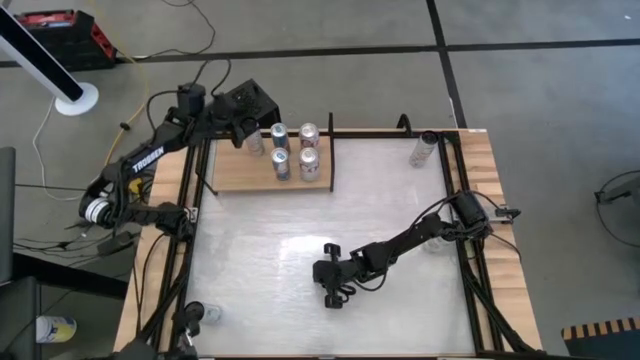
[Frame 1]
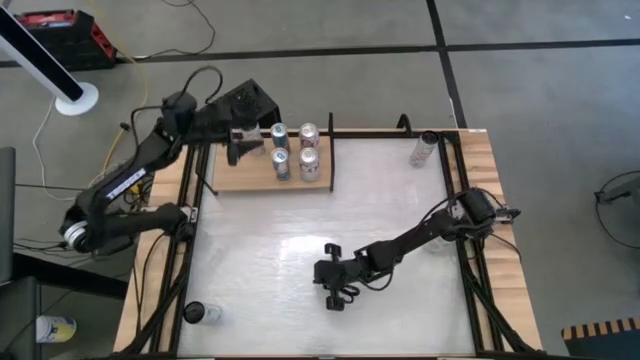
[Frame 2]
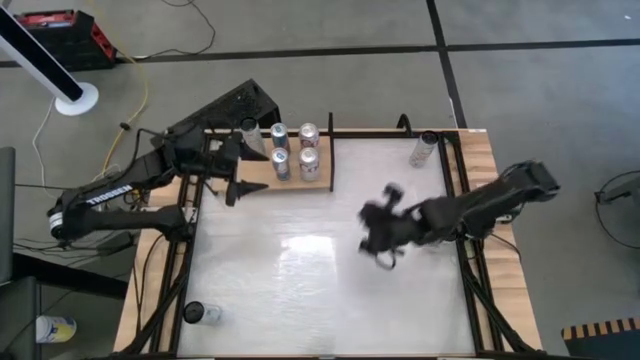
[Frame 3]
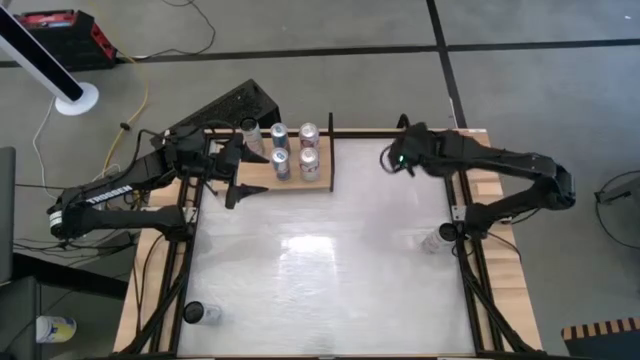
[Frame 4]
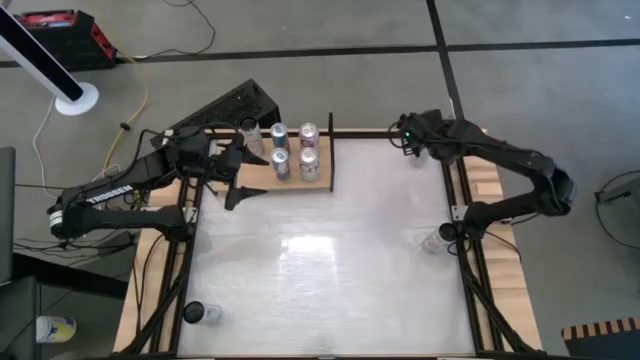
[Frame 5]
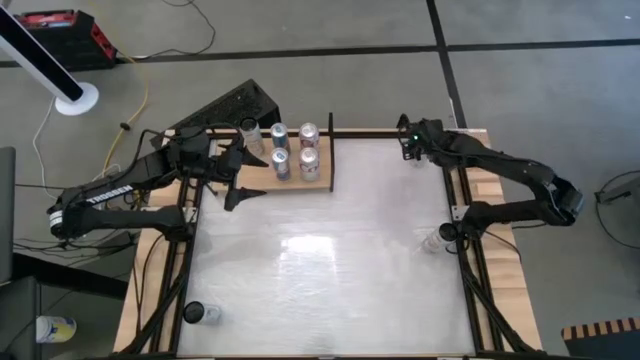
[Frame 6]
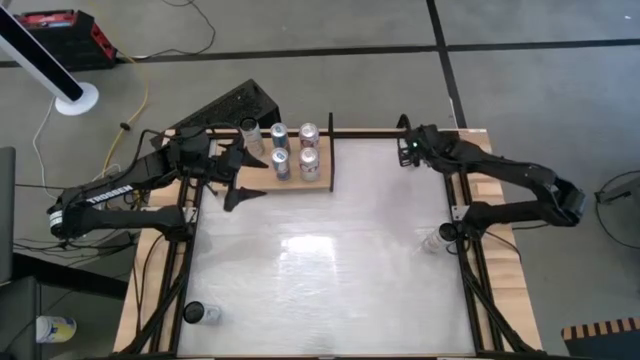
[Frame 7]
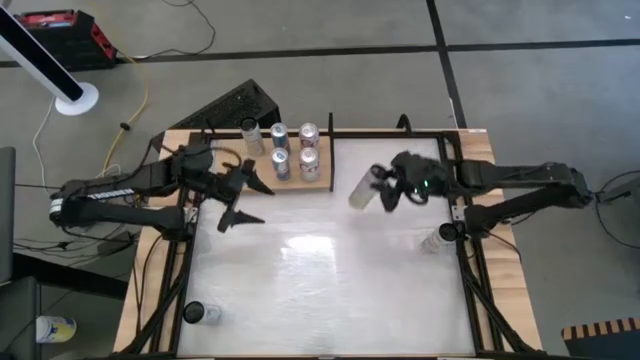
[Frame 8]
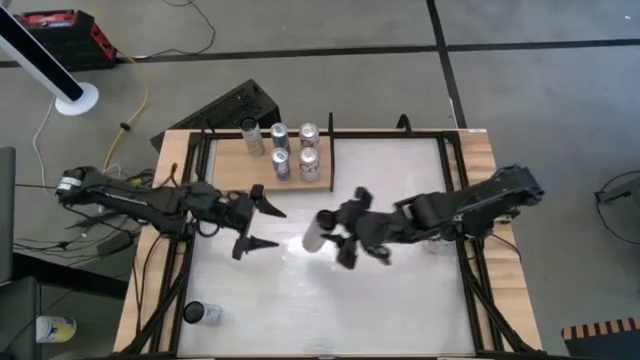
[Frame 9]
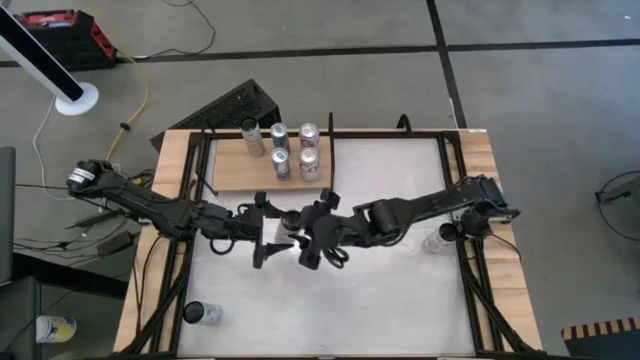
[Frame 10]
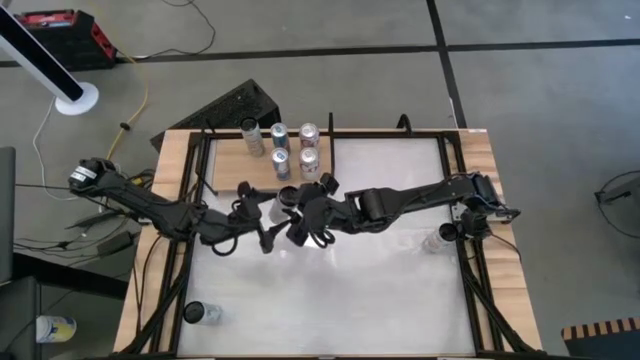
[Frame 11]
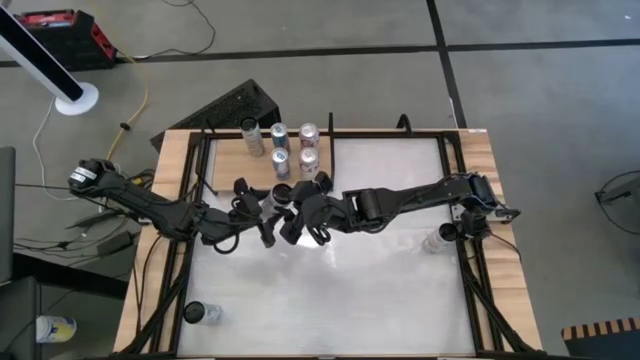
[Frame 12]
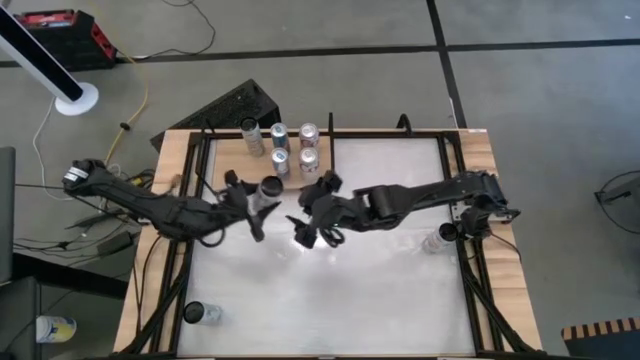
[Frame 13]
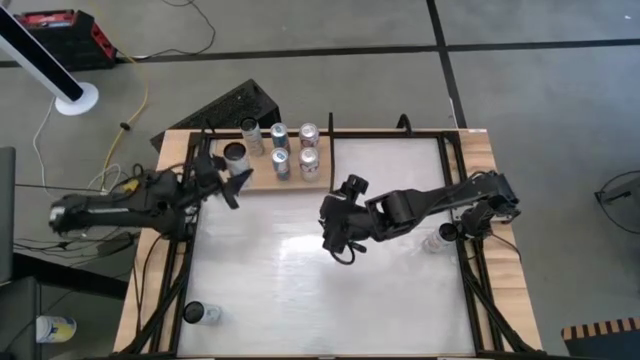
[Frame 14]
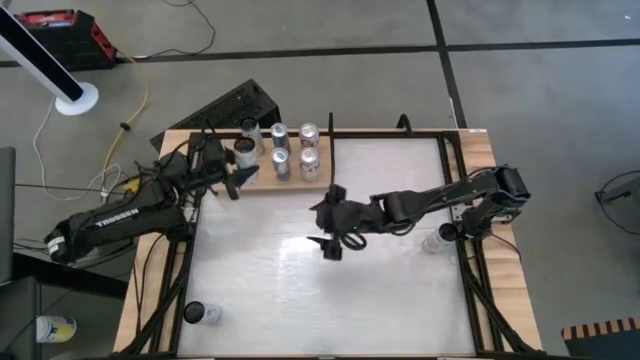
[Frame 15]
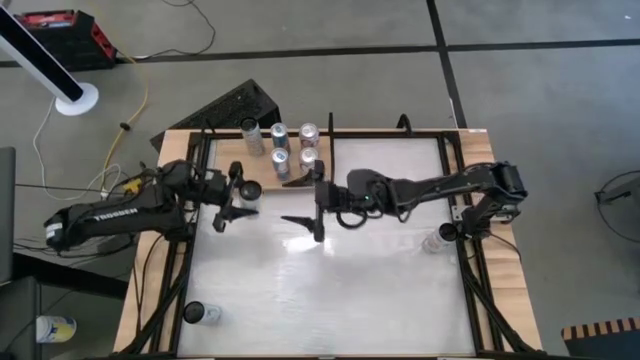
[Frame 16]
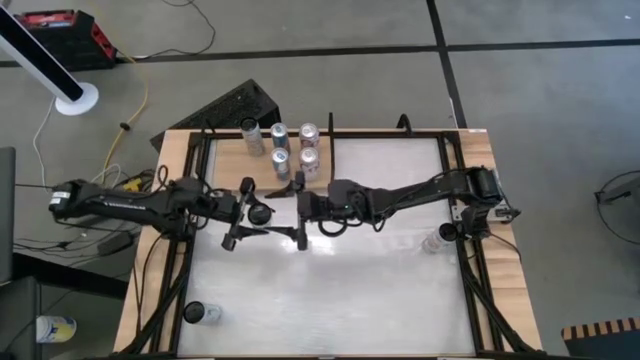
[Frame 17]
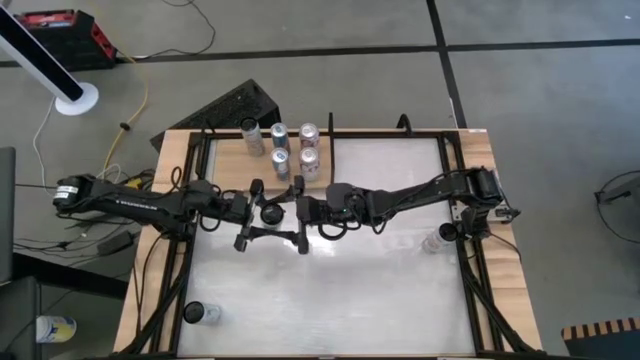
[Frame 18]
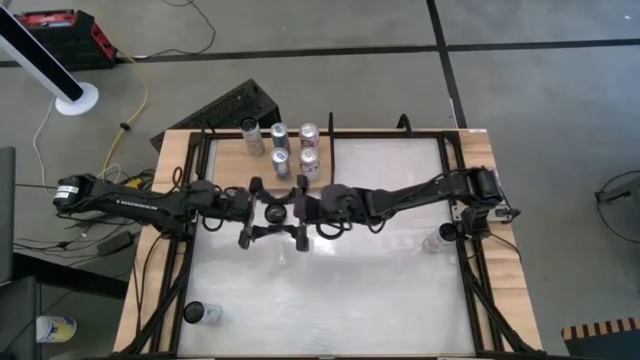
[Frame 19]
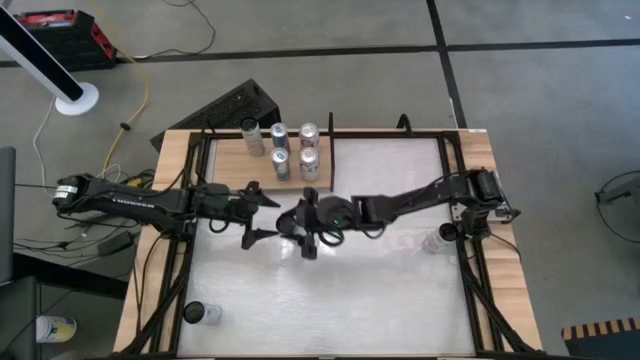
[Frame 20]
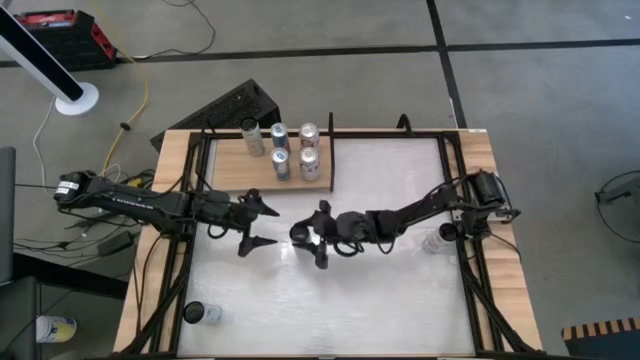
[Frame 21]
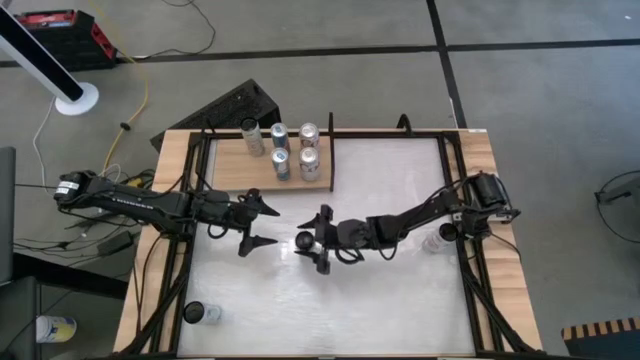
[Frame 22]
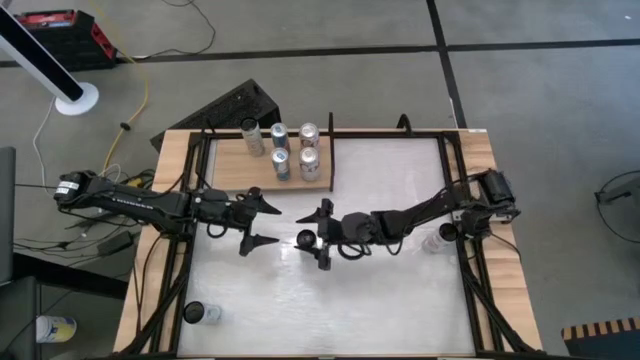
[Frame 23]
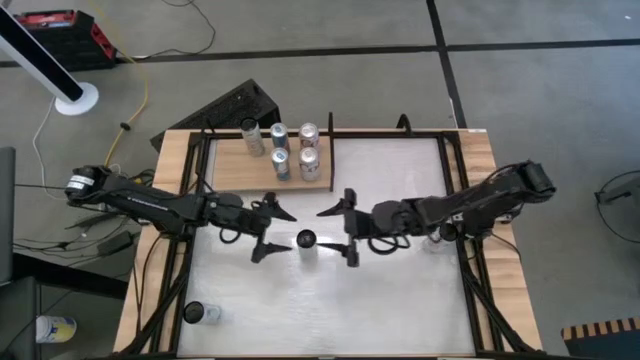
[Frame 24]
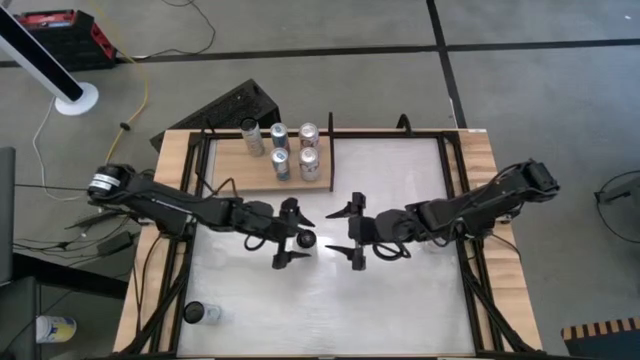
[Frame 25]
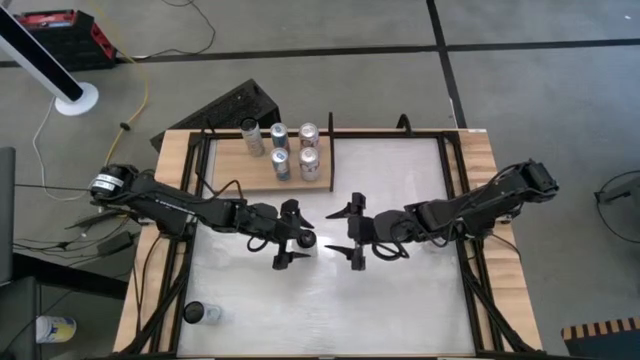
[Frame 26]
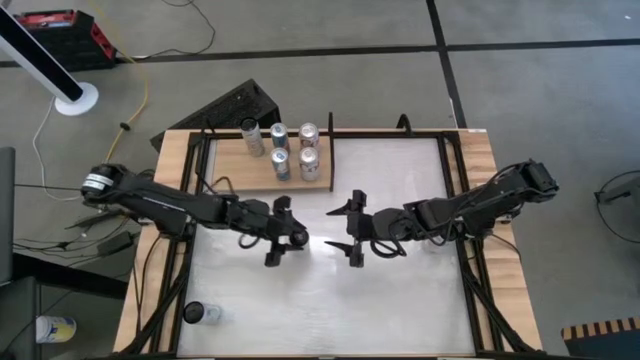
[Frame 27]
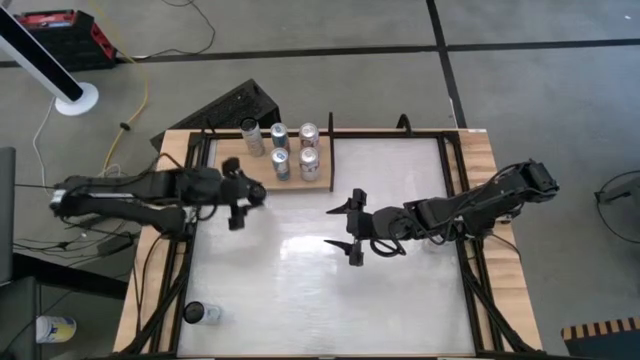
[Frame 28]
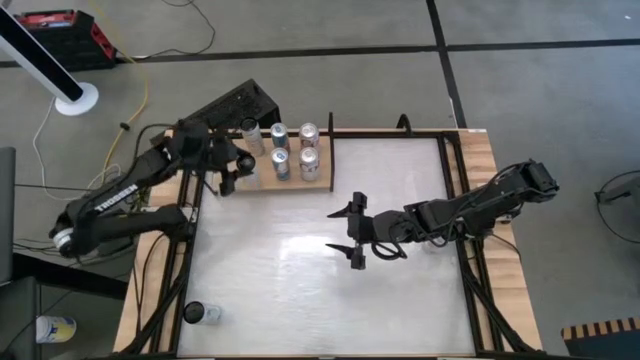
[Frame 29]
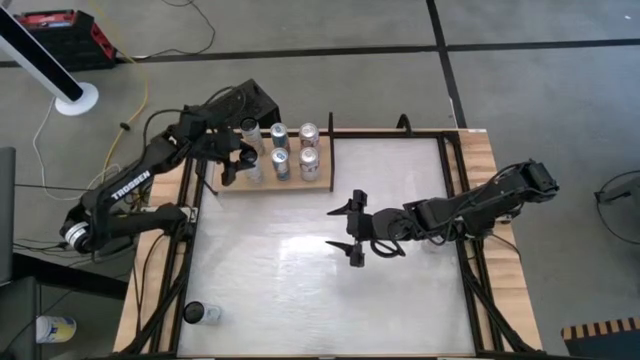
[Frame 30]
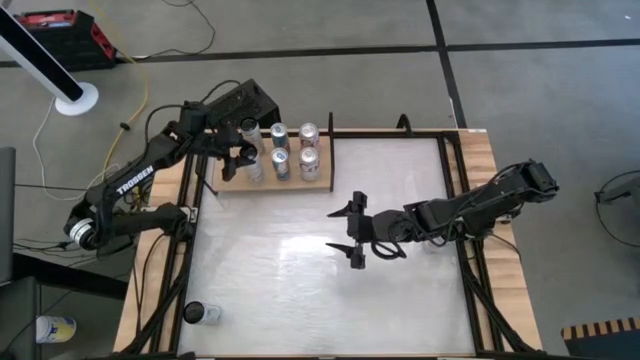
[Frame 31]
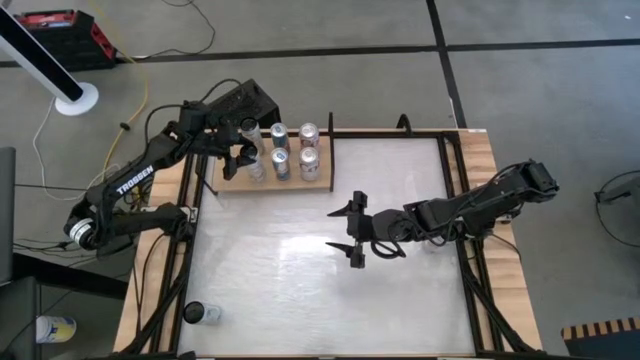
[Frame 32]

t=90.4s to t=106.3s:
Task: Place canned beverage on shelf
Put the orange soda can on the shelf

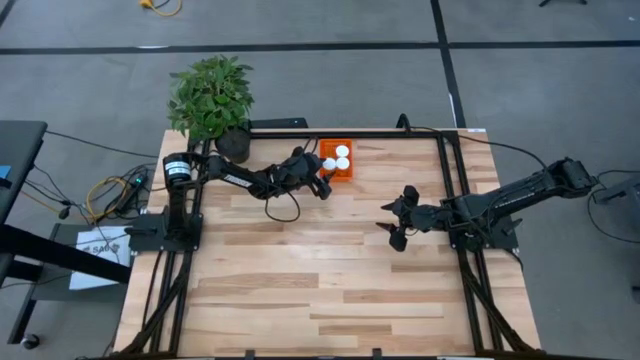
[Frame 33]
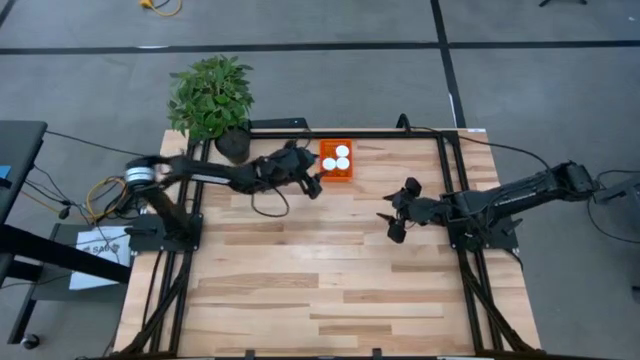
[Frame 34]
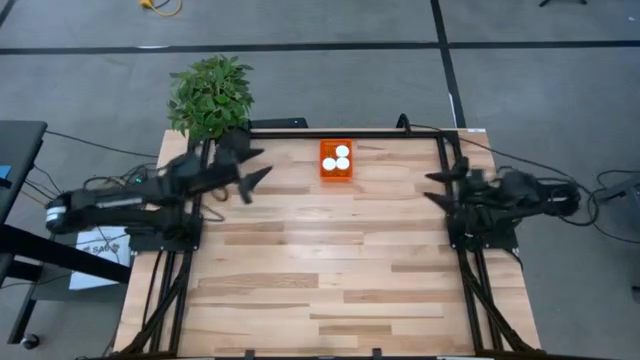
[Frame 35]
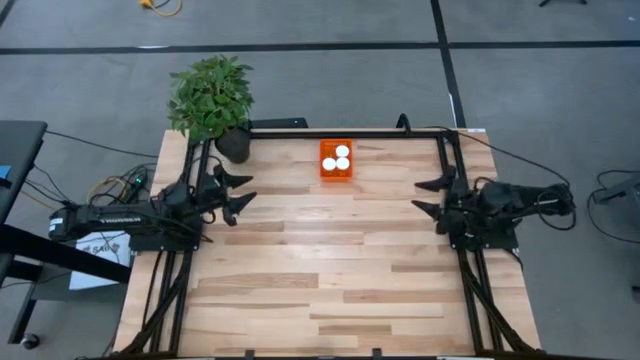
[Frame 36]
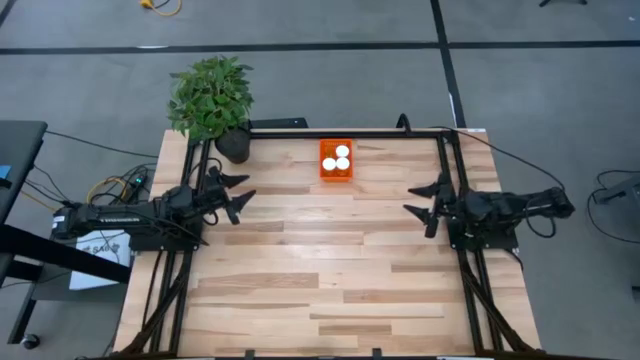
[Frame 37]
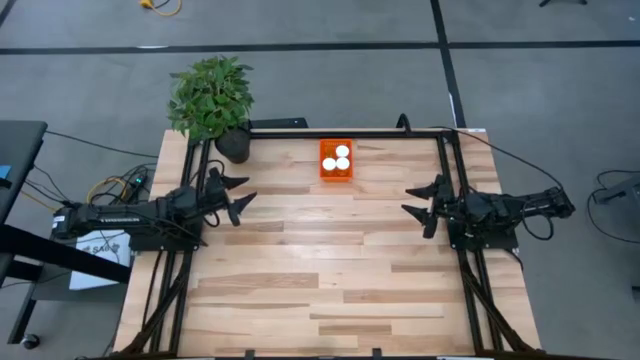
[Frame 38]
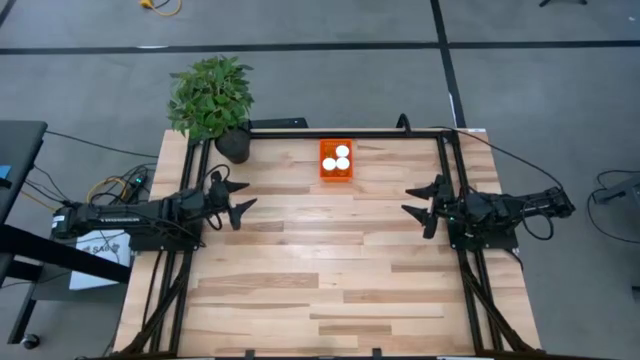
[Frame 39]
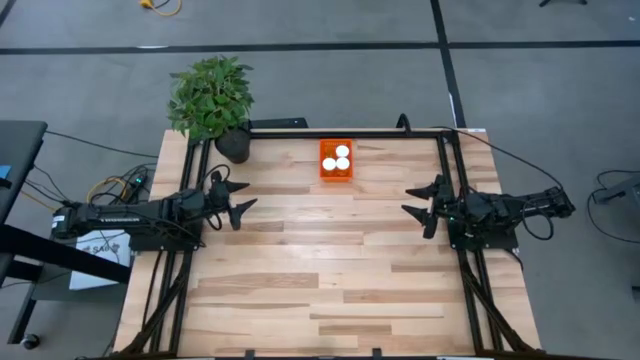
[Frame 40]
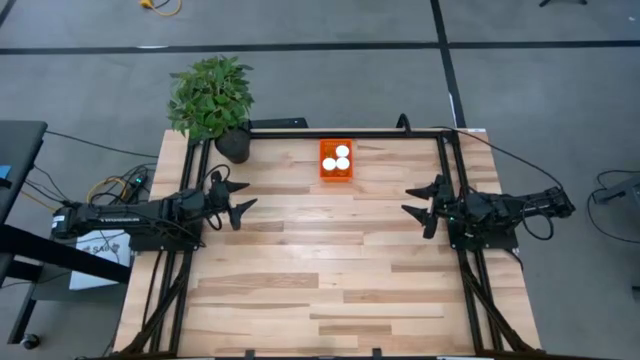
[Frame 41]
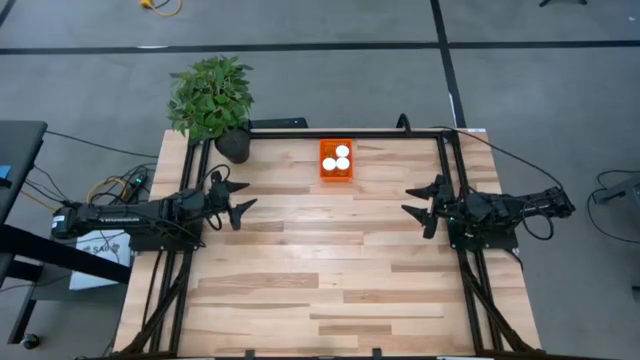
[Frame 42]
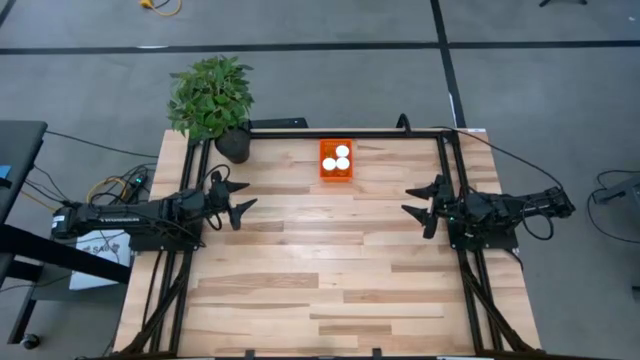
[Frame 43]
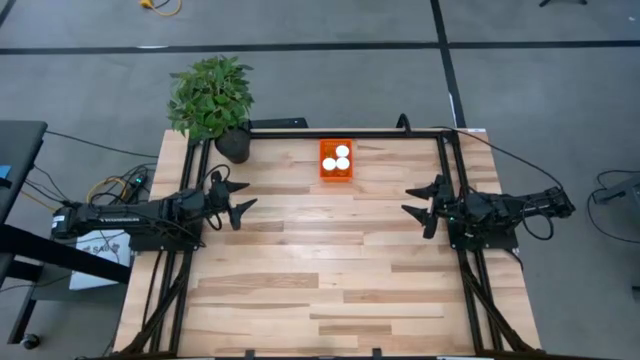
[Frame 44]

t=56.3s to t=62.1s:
Task: Pick and place pill bottles into a basket
Return to Home Position
